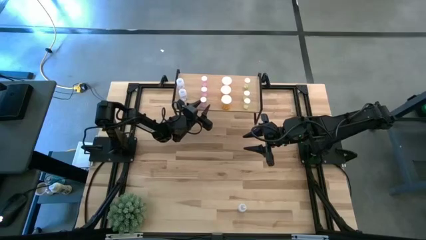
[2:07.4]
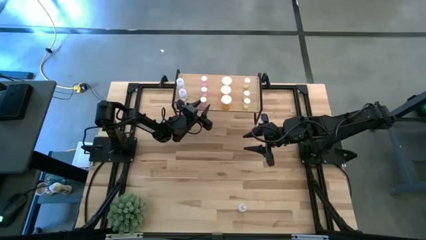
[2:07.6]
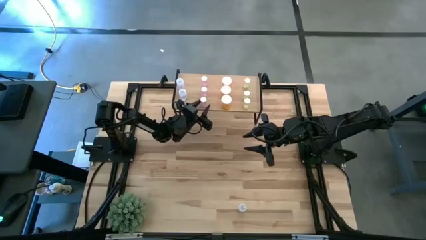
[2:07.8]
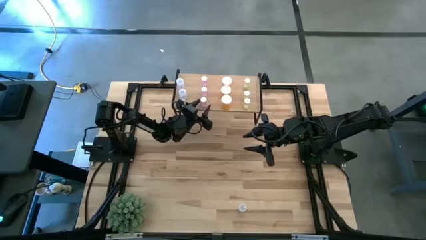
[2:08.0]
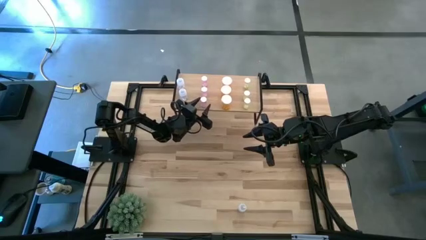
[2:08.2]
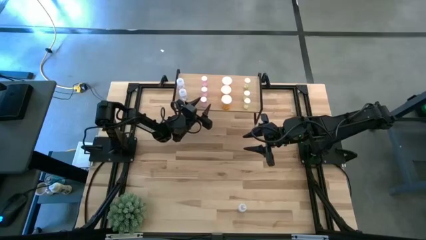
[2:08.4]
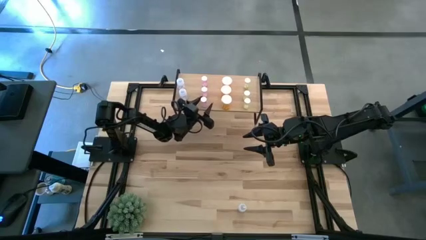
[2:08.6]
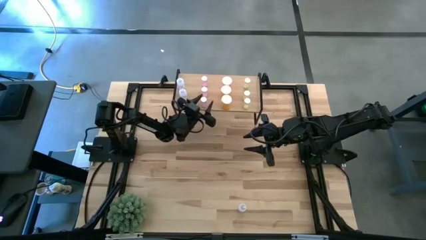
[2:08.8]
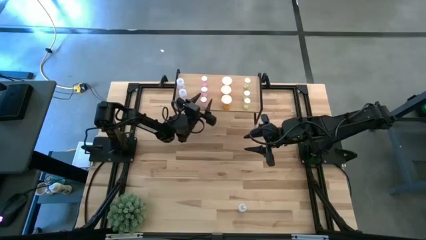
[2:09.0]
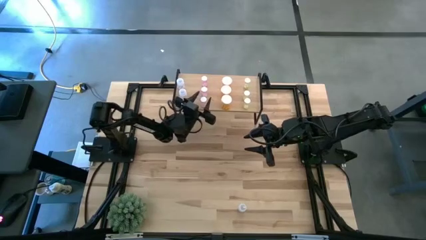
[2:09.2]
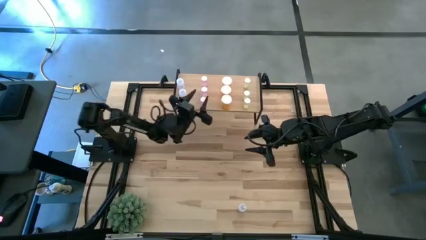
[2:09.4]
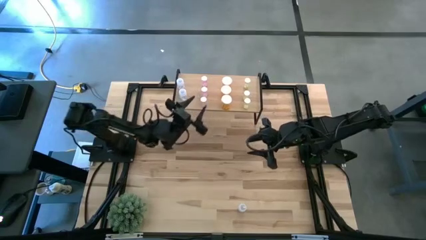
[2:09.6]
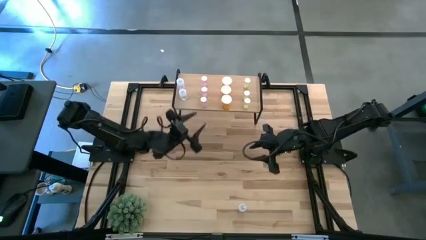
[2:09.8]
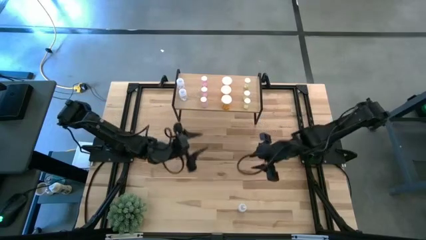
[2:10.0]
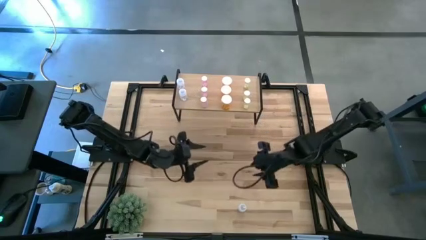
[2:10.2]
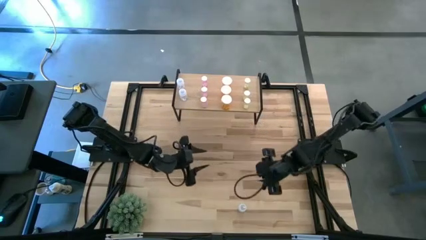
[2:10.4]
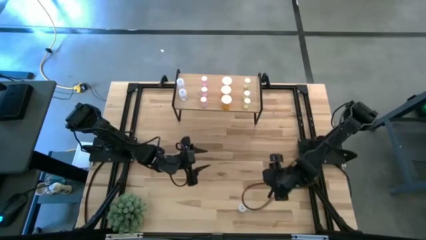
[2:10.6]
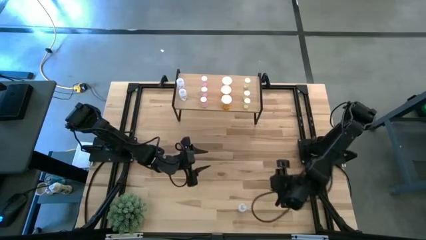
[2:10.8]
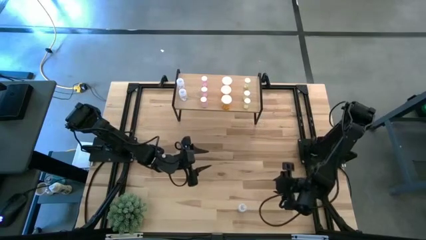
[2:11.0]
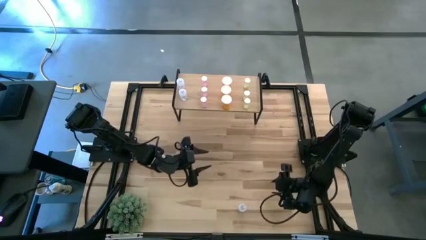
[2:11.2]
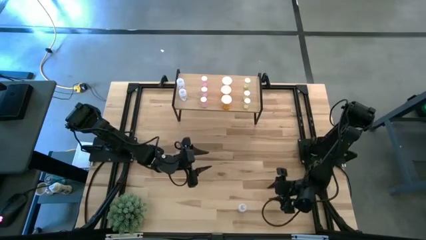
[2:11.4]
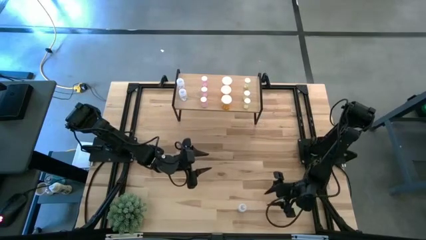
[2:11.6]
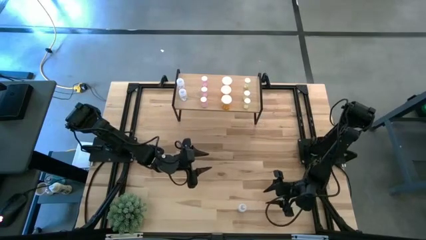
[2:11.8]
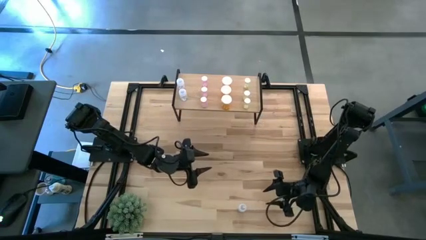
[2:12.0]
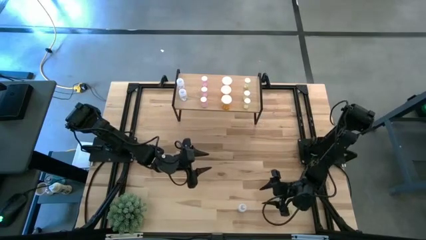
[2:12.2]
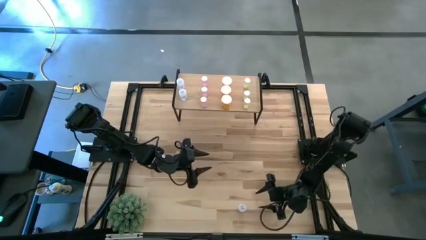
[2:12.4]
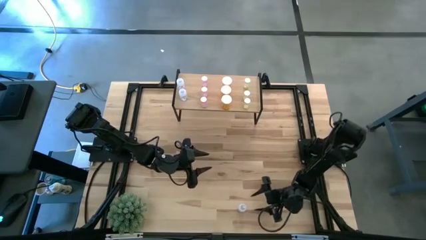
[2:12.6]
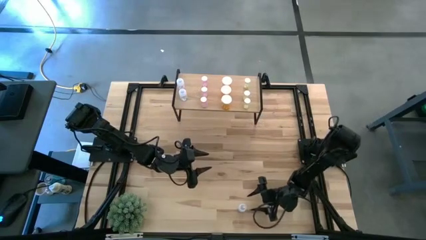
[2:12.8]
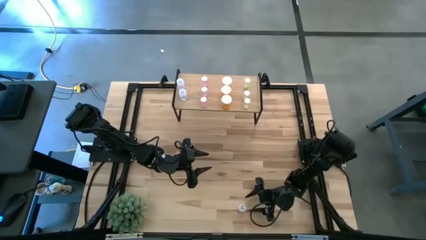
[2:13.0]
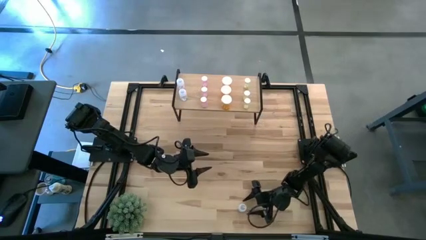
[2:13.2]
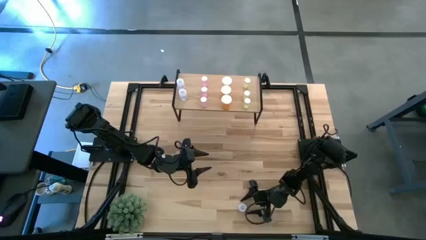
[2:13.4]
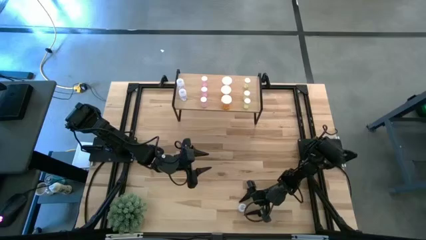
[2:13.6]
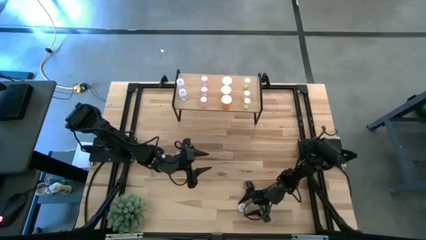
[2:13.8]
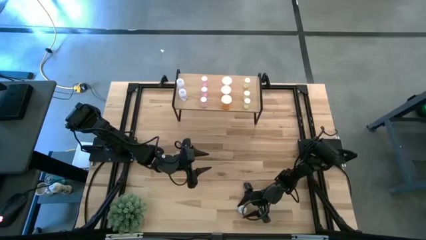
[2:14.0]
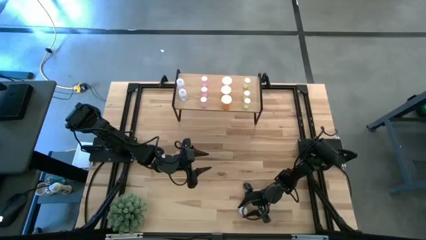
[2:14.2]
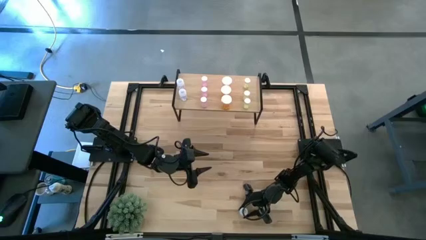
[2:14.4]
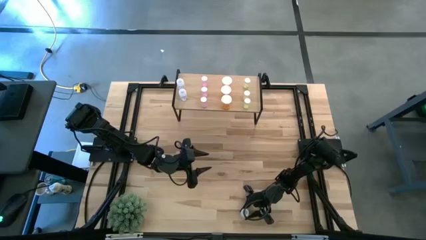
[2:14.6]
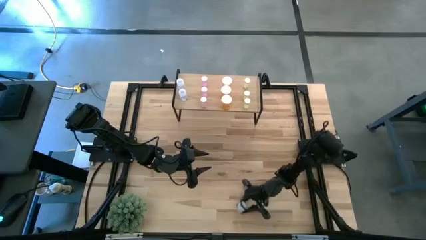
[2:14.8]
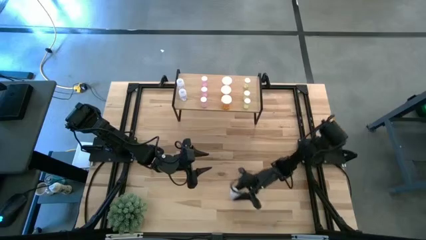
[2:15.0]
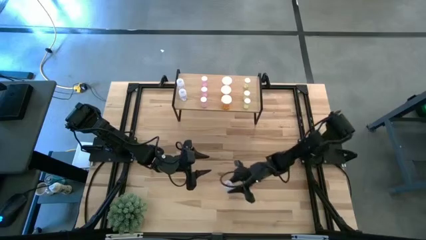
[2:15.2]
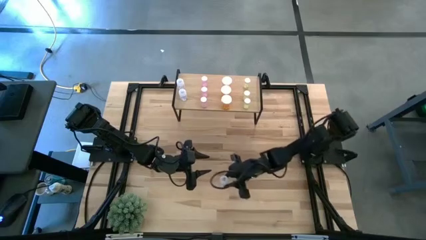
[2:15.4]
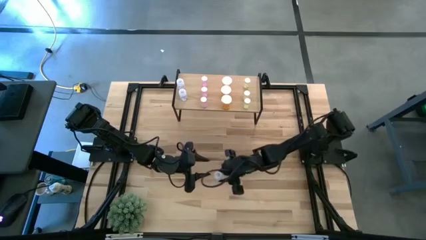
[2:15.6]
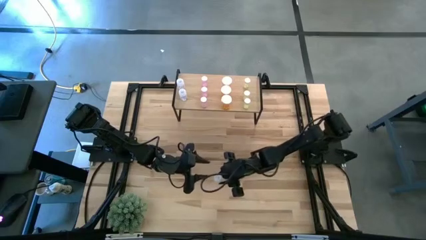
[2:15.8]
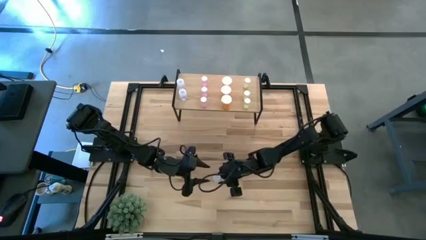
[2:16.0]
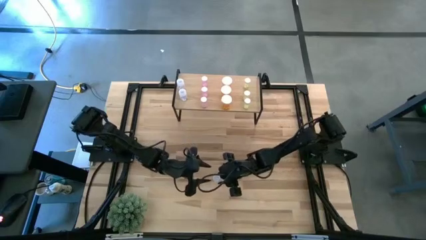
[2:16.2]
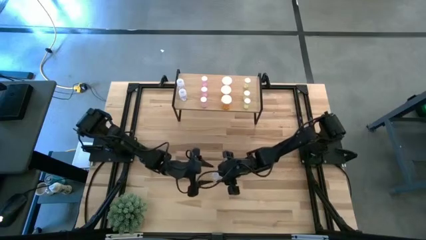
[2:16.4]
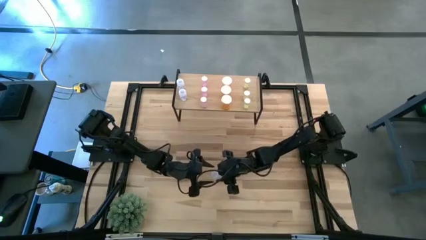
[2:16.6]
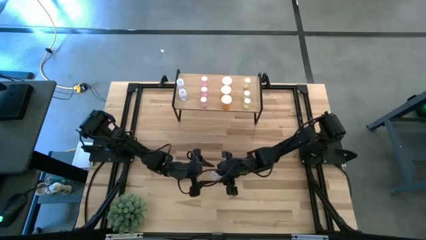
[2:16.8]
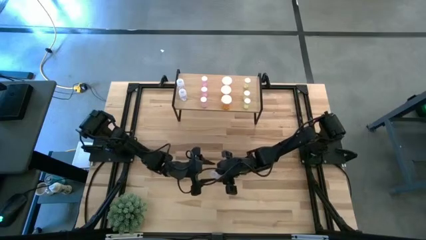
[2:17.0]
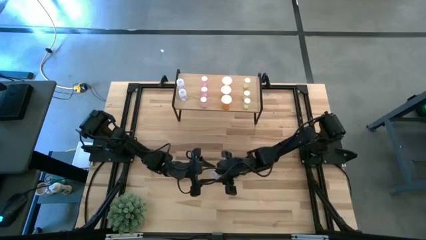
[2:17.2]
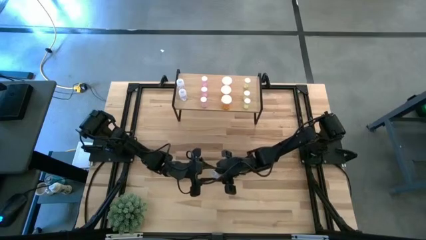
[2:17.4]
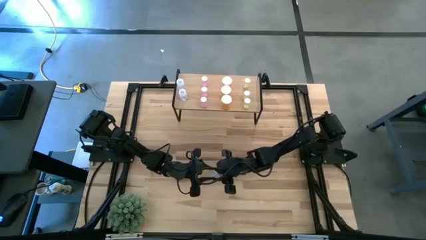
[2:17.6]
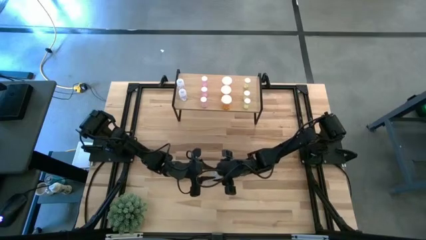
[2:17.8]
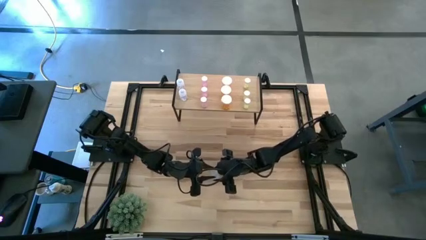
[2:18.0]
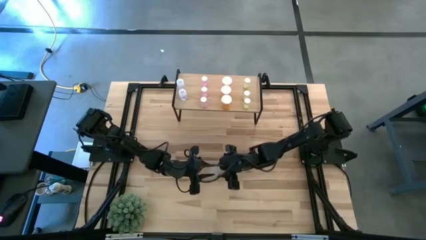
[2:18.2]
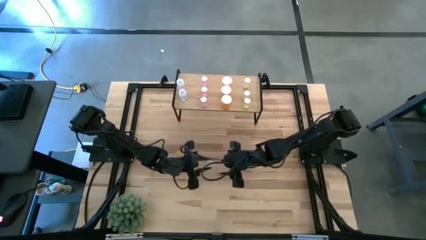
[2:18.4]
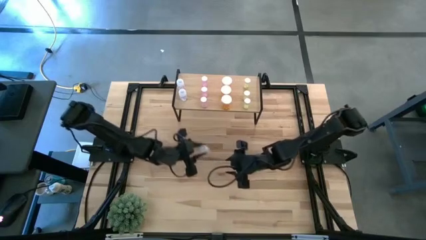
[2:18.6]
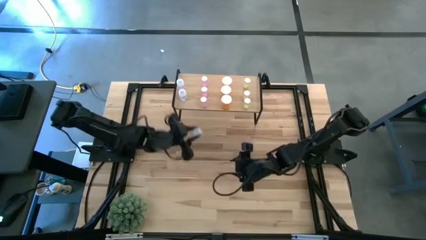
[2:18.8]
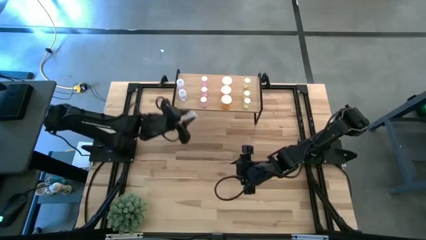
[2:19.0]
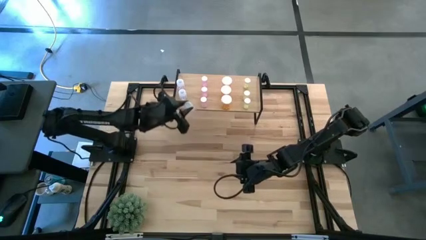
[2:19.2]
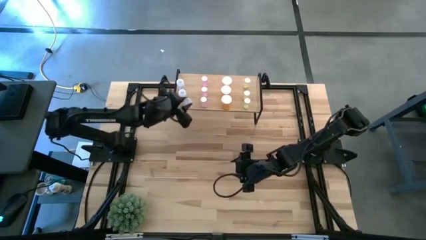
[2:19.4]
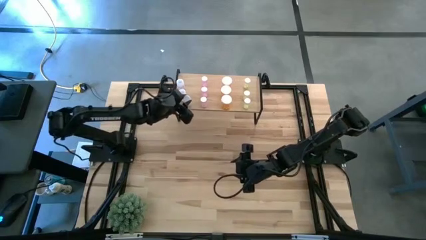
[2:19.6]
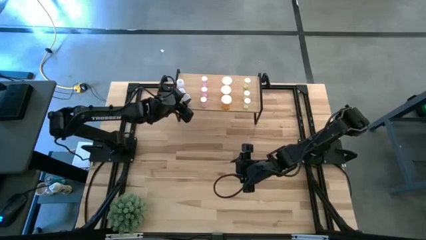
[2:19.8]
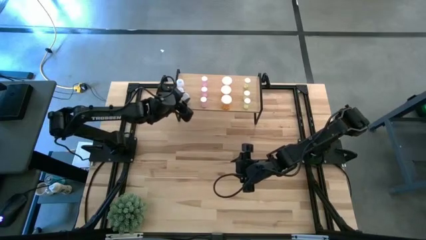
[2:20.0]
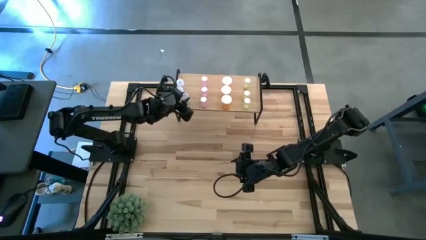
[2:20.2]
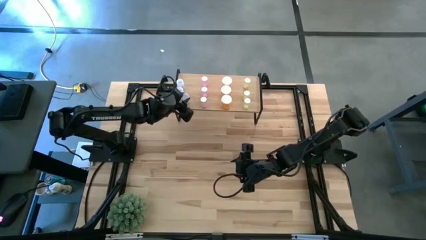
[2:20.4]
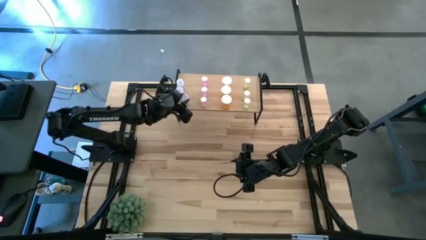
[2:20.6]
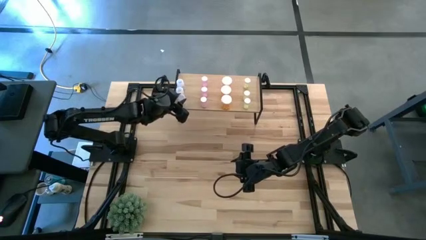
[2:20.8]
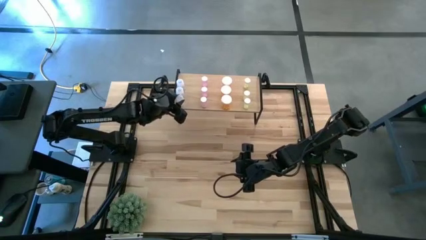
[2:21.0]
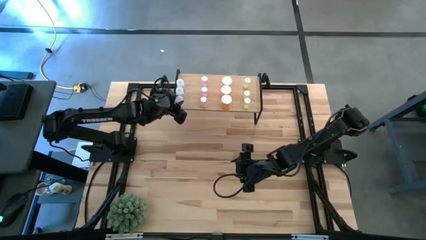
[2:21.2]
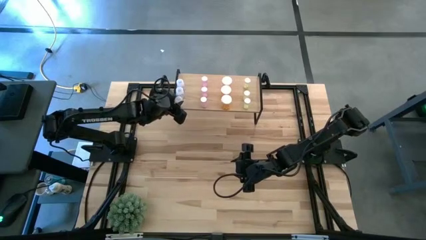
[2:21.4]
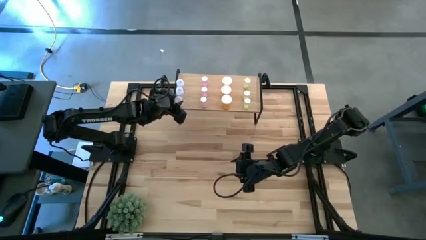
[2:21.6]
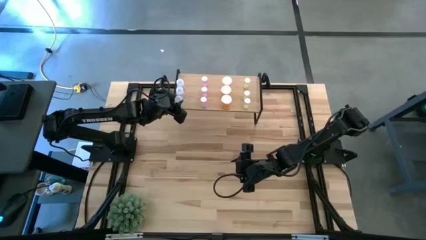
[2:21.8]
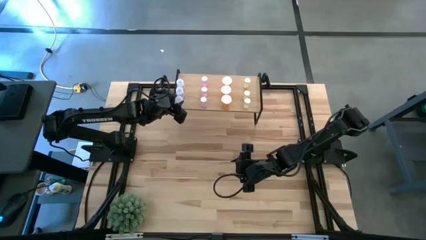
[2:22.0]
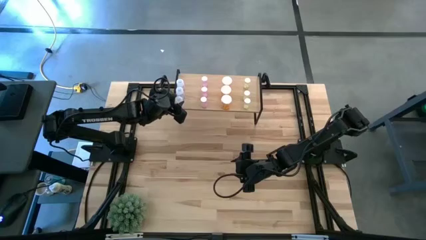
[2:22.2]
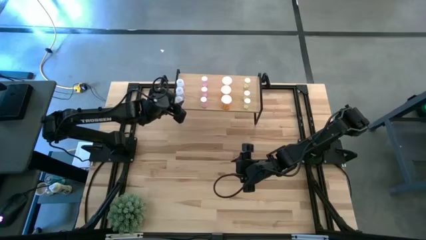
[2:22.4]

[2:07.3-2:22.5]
Task: Pick and place medicine bottles onto shelf by color
Put the transparent pill bottle on the shelf aligned with the other transparent pill bottle

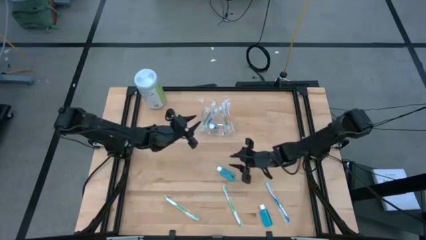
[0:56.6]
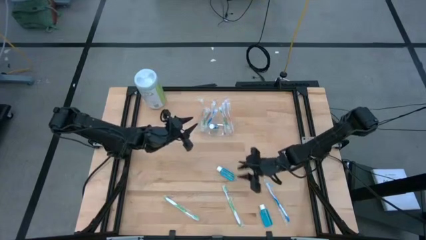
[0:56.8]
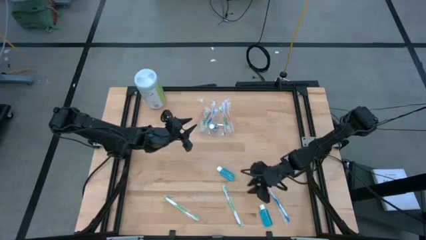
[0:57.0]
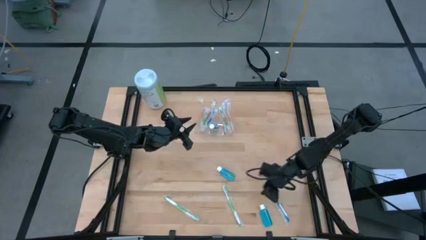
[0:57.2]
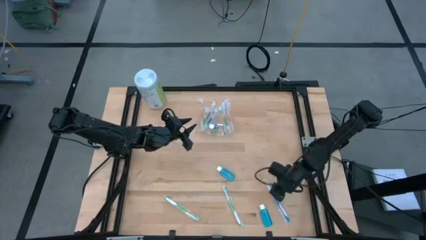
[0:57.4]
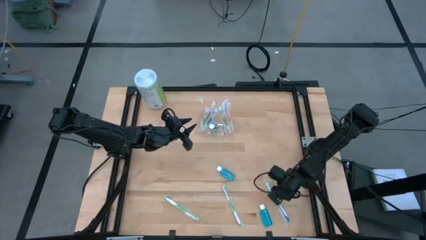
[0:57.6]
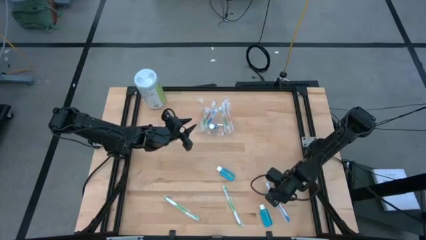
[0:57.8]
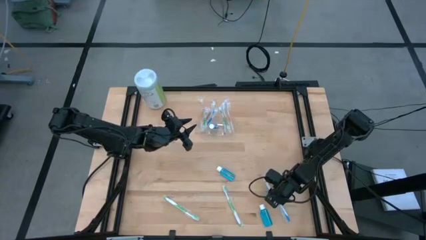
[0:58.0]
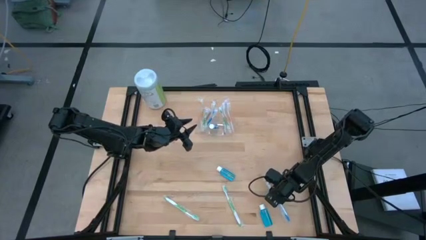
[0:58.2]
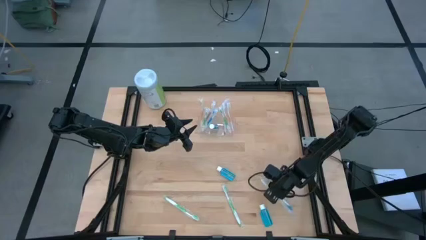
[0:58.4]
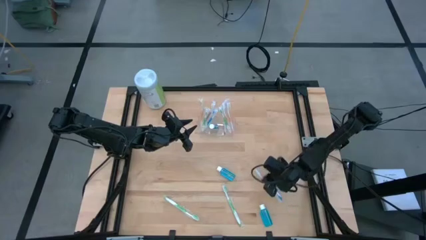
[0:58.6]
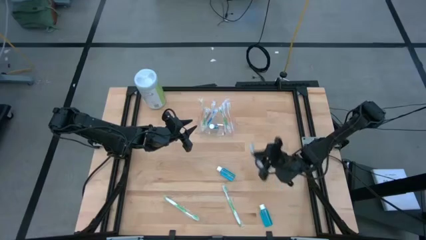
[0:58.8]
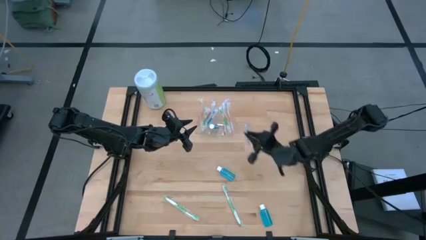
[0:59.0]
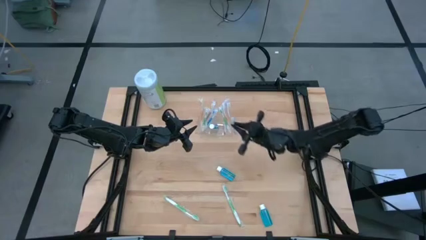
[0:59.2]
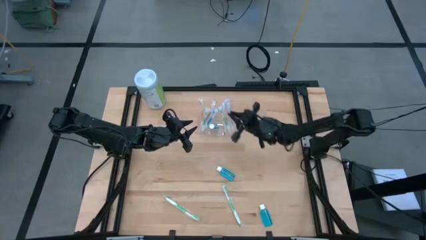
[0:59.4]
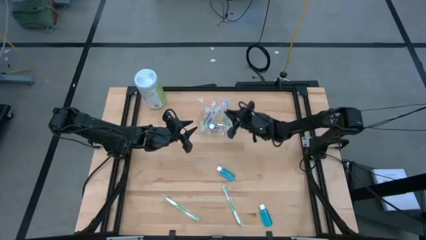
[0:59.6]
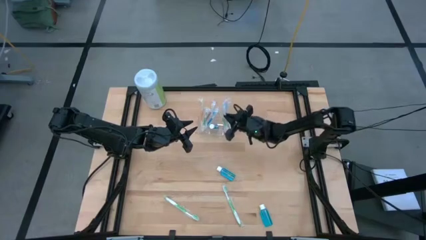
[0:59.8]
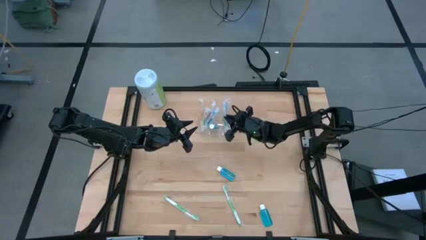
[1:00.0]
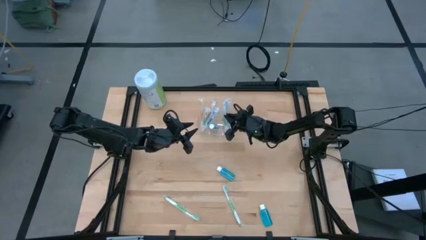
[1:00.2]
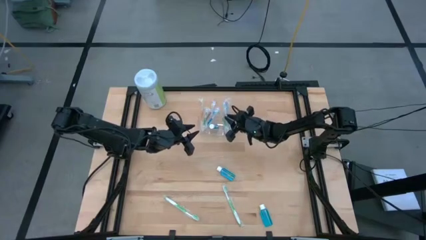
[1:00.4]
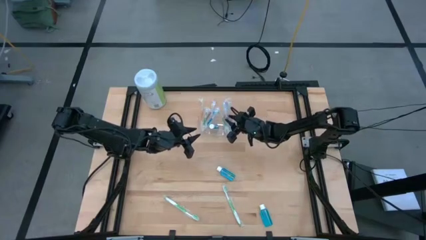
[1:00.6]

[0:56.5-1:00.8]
Task: Pick & Place toothbrushing station
Put the blue toothbrush to the right of the transparent organizer
